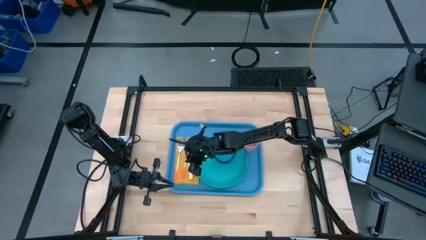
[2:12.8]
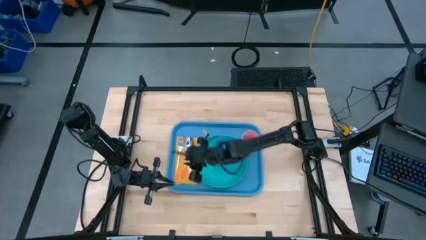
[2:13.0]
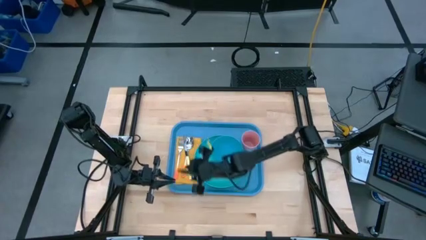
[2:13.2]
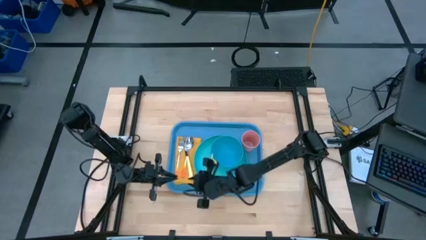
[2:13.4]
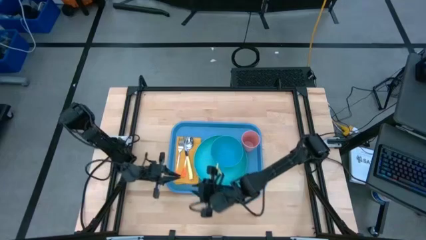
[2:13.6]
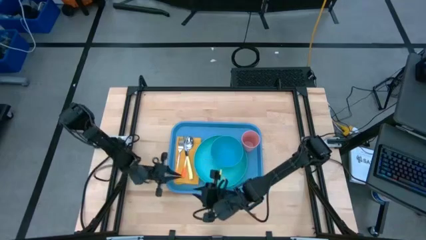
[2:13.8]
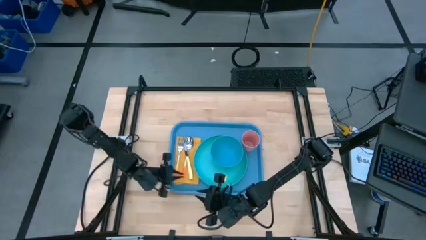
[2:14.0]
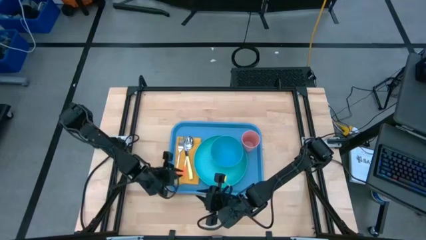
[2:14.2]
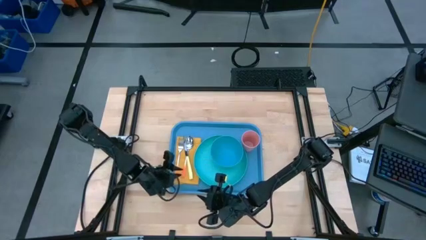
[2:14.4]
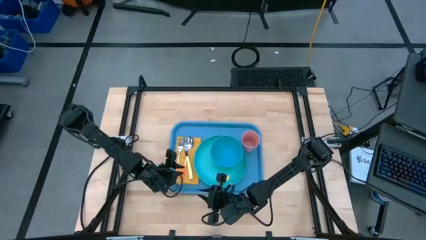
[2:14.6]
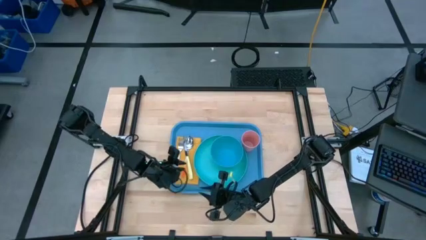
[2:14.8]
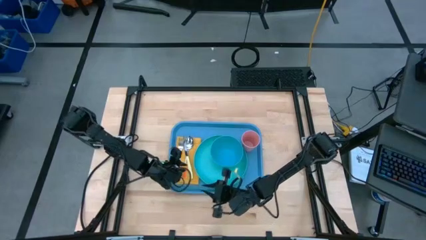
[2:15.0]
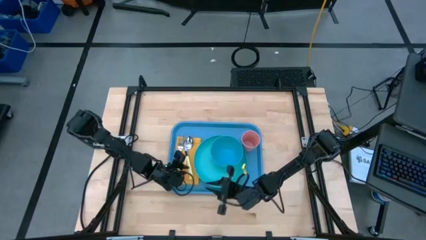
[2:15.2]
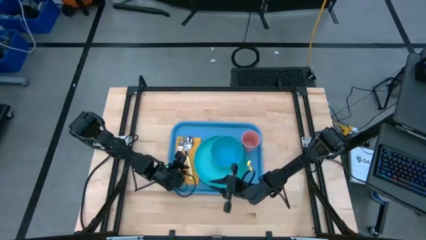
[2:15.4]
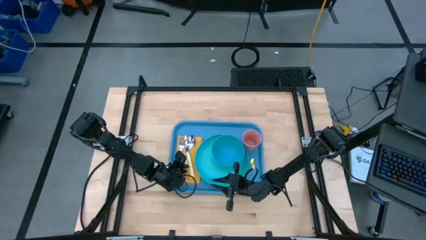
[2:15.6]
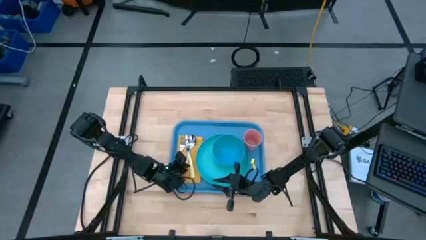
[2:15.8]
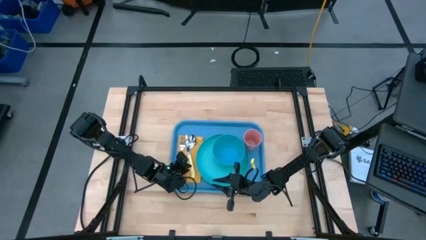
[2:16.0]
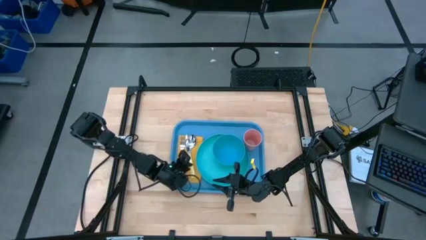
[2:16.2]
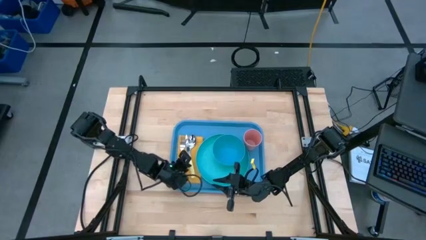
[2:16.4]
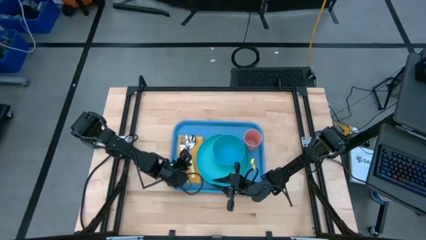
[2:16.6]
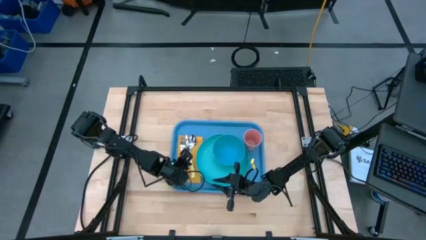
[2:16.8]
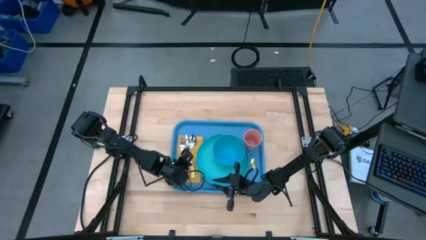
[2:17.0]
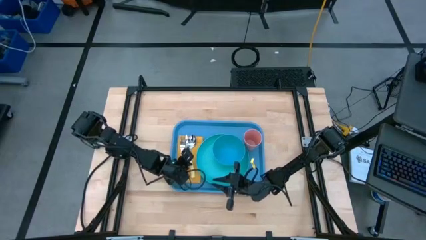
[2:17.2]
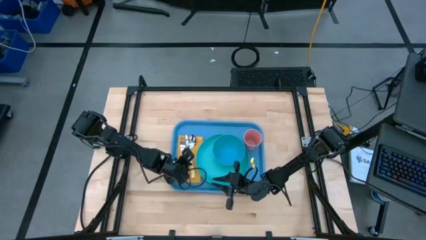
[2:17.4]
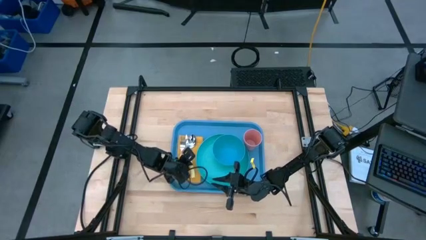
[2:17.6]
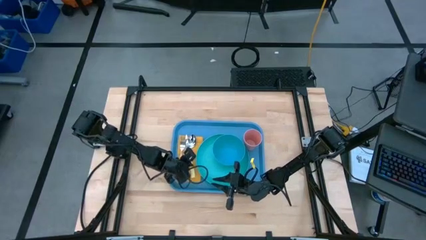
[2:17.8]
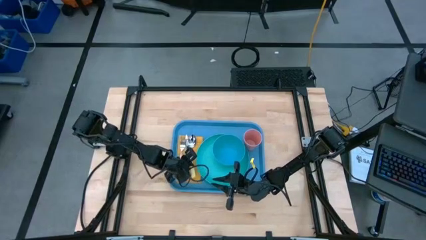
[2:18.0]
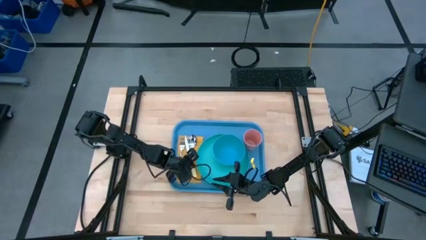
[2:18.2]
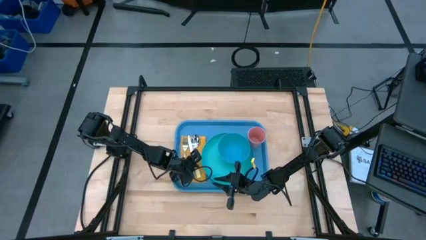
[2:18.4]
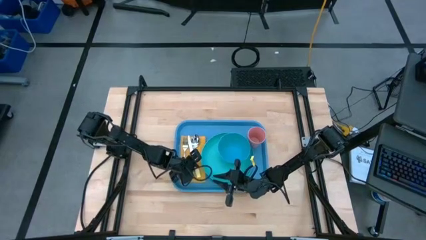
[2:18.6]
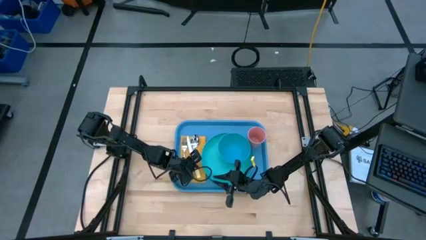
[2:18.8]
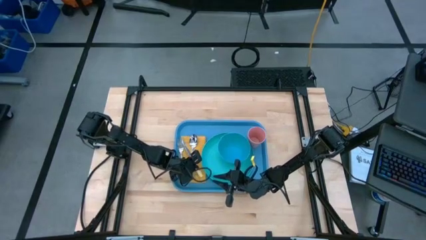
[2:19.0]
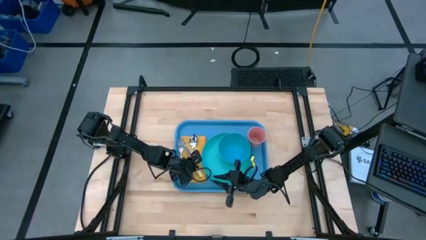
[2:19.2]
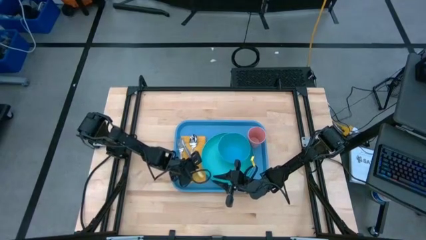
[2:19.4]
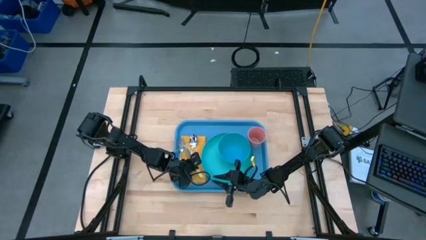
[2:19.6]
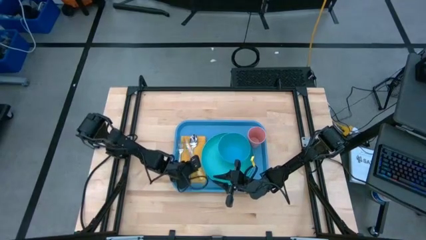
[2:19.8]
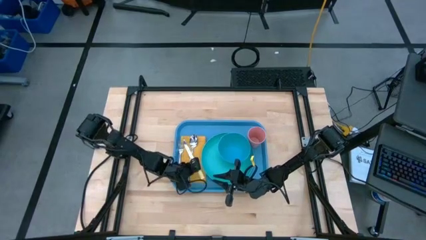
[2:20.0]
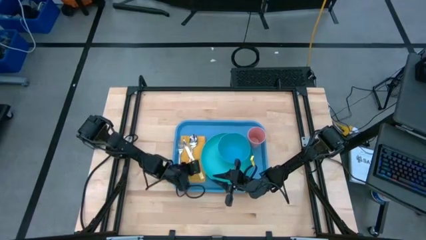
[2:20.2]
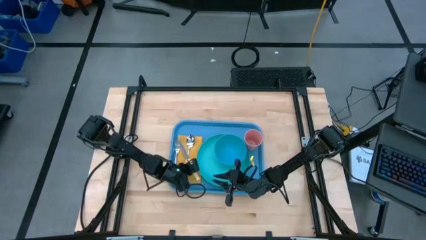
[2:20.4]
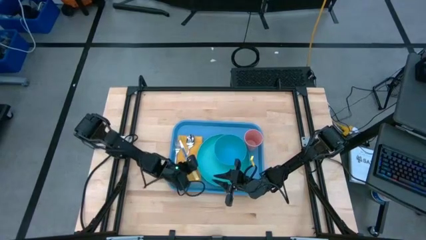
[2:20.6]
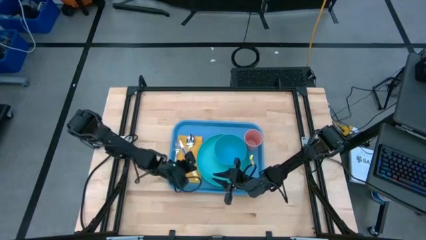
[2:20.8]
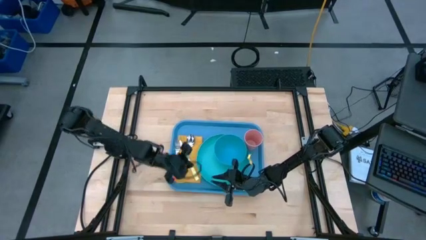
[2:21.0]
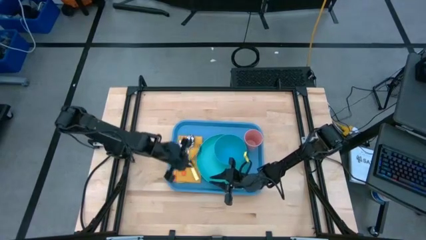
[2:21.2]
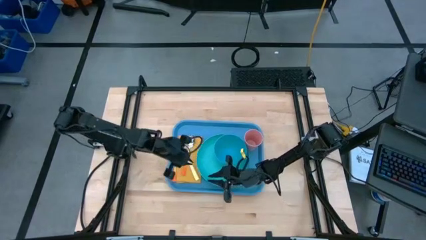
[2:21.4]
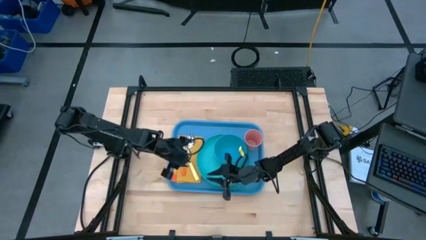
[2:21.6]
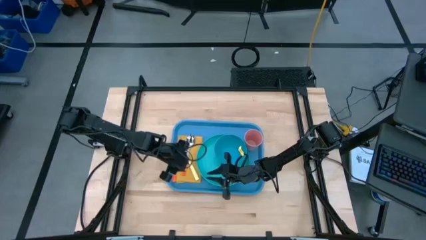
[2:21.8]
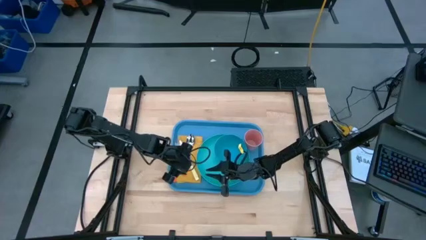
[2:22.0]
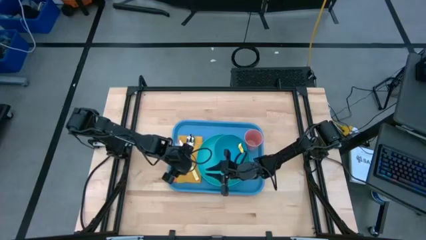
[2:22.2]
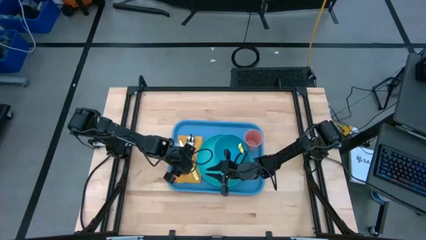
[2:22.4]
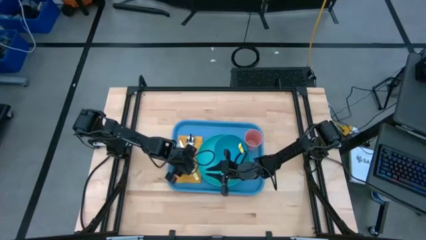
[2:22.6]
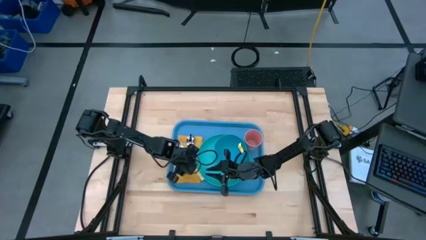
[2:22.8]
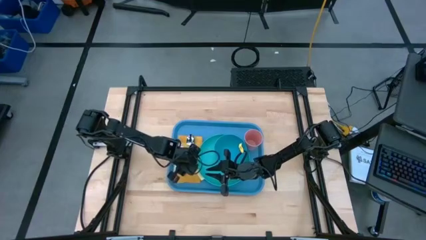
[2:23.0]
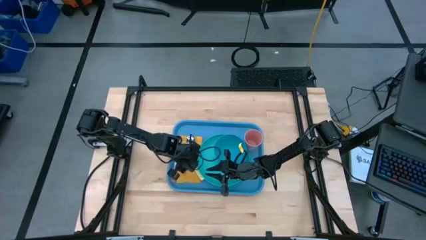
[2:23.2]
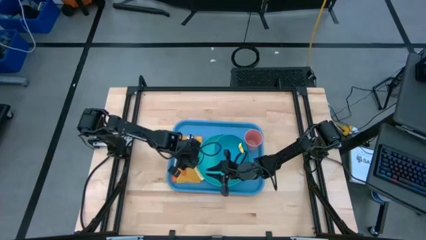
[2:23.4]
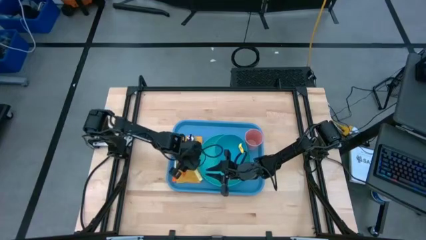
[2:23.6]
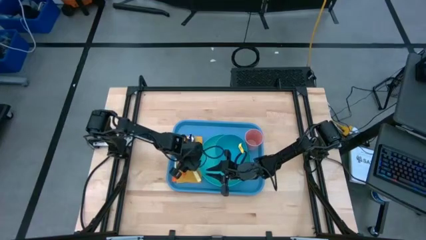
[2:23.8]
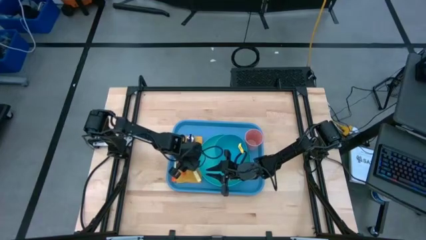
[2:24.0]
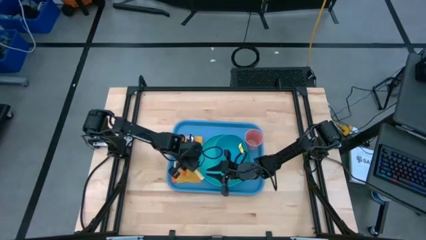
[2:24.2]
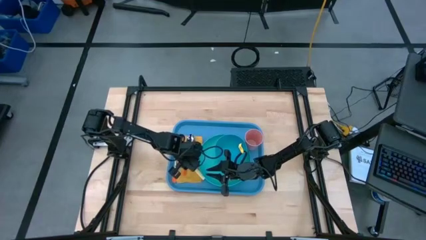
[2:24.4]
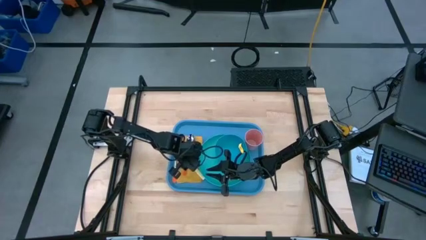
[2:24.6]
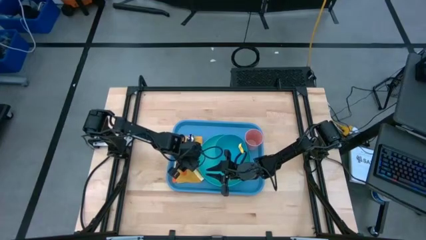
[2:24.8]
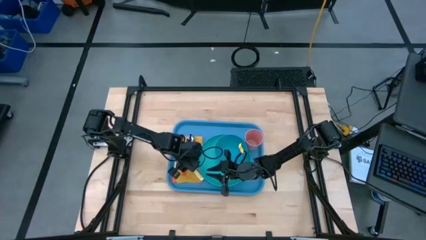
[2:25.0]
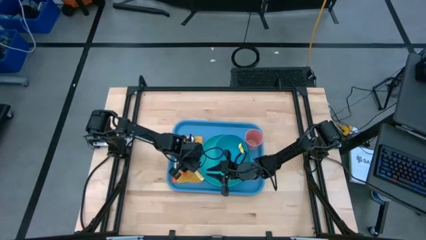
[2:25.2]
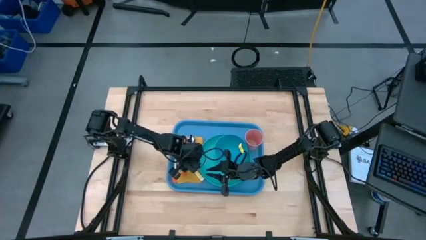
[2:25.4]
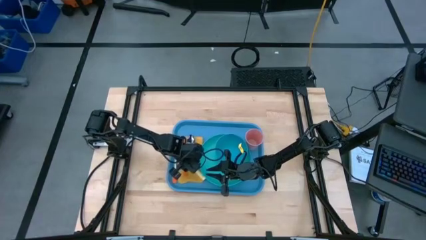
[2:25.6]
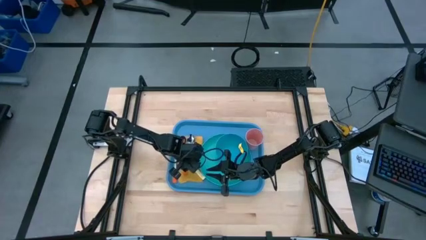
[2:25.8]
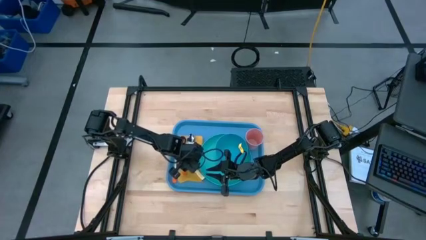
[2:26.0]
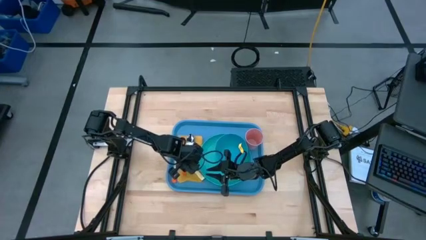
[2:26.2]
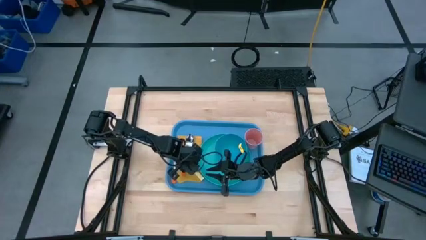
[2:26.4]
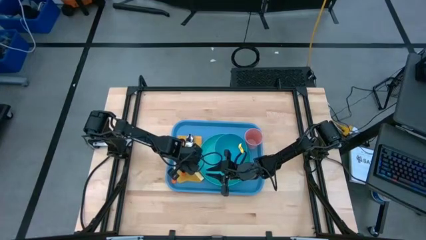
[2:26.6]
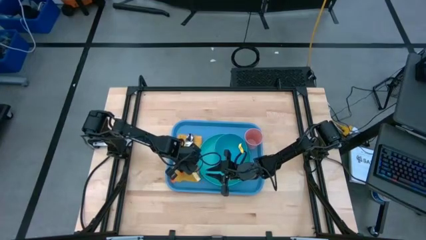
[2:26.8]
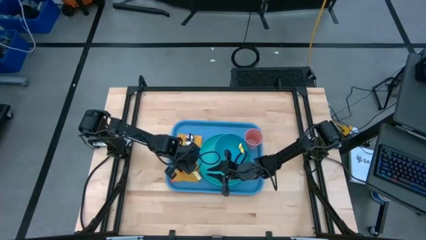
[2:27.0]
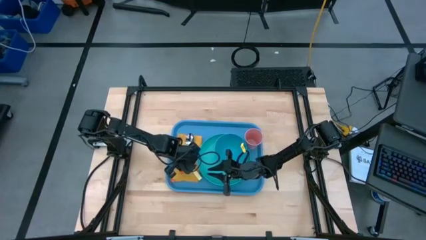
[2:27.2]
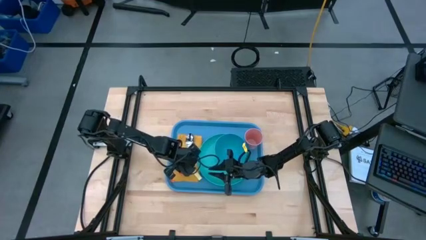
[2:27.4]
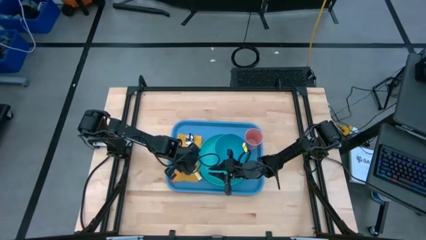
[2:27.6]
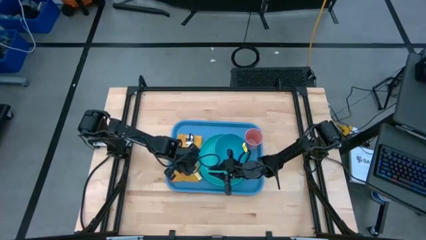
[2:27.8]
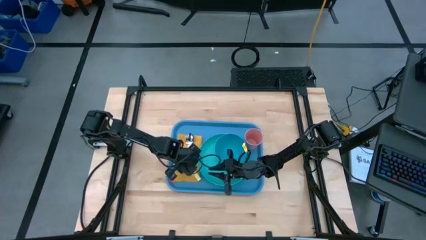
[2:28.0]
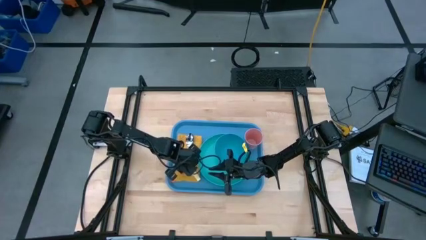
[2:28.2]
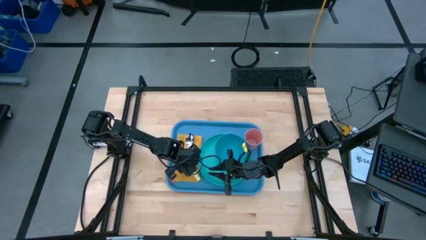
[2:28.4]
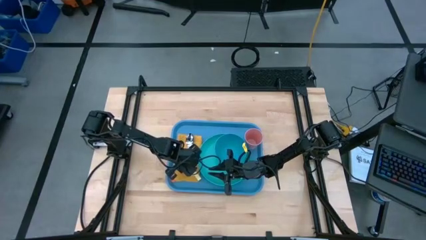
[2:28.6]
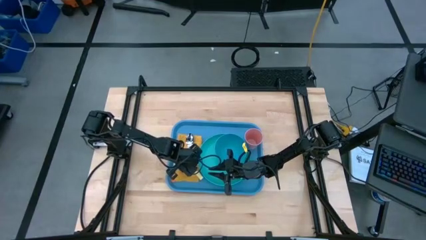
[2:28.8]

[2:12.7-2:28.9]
Task: Set up tray
Put the knife on the yellow napkin

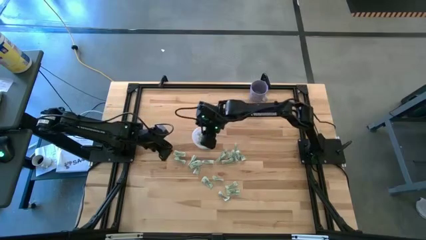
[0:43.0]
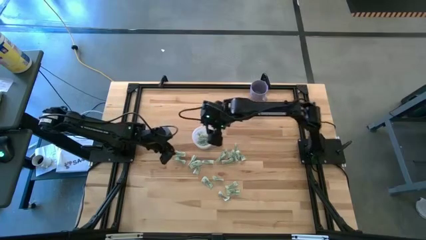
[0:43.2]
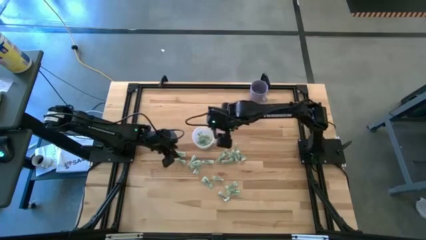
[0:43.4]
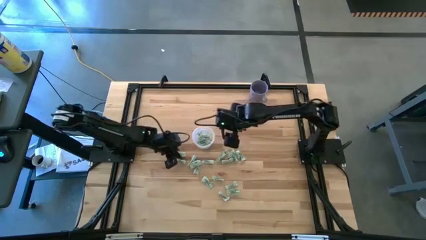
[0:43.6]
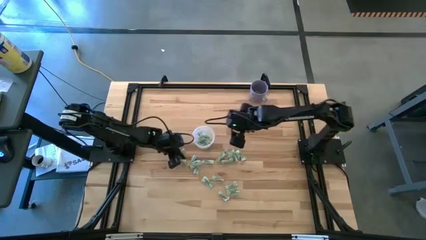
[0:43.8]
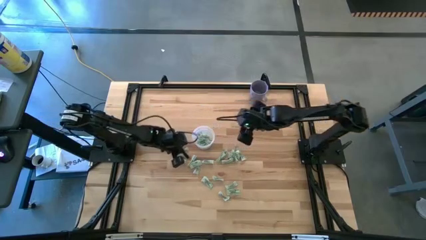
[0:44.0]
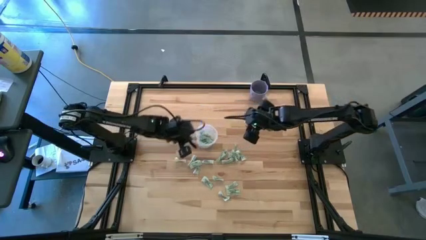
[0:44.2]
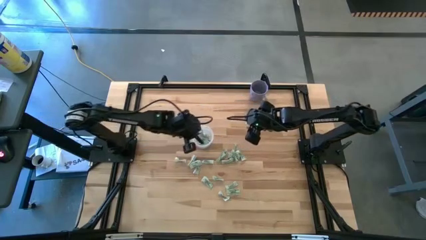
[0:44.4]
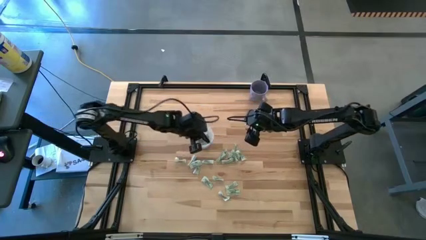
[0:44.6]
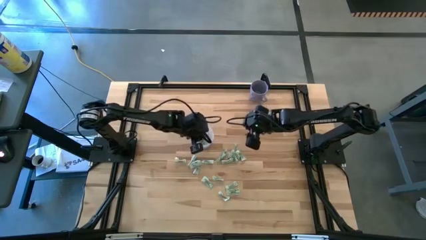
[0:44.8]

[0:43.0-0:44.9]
Task: Pick and place Stevia / Truvia into bins
Put the white stevia packet into the transparent container
